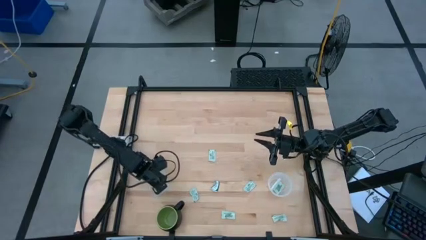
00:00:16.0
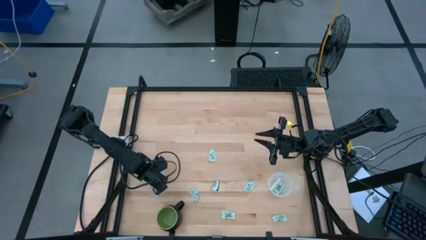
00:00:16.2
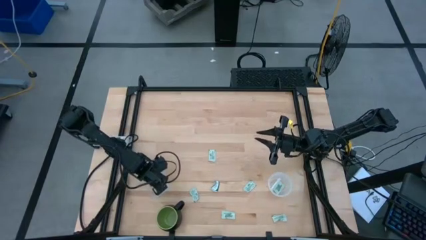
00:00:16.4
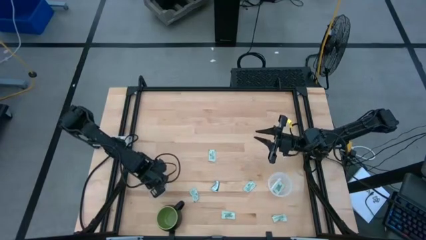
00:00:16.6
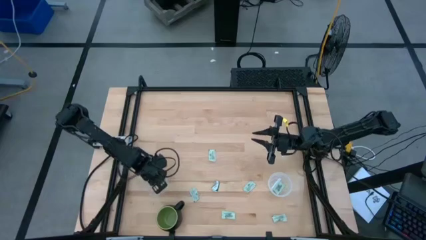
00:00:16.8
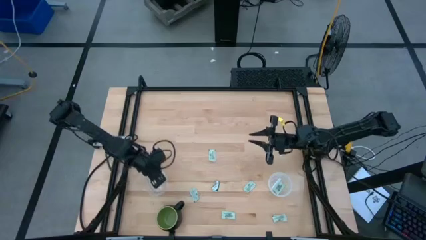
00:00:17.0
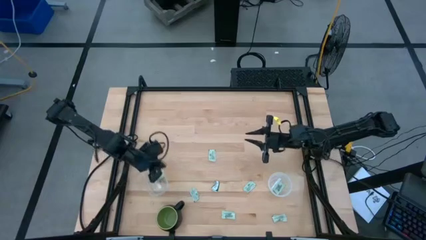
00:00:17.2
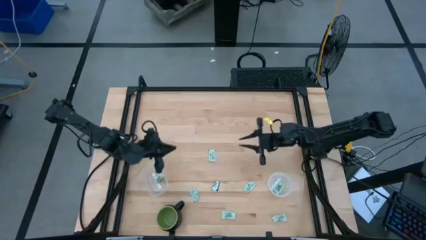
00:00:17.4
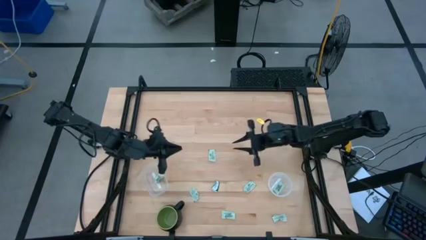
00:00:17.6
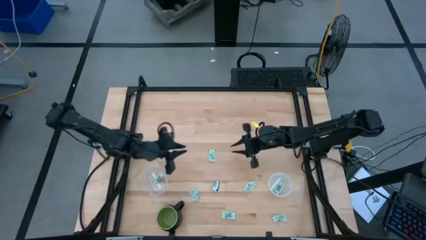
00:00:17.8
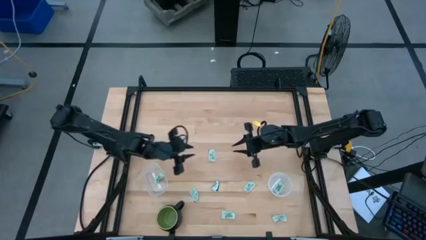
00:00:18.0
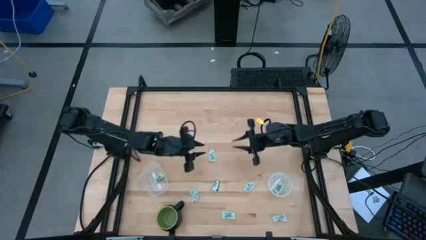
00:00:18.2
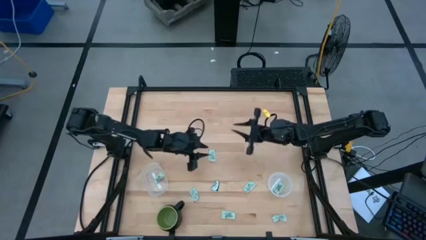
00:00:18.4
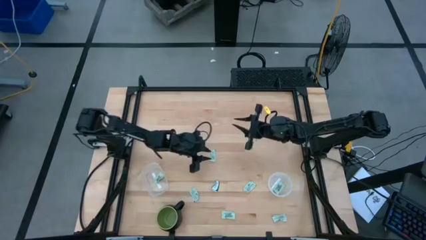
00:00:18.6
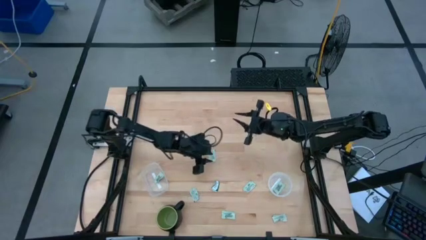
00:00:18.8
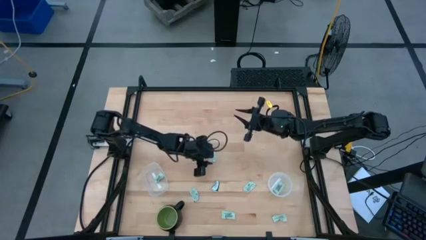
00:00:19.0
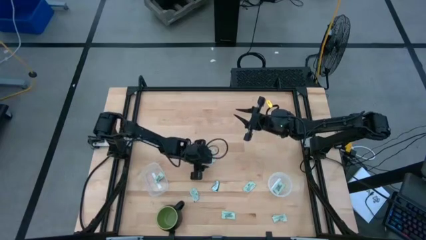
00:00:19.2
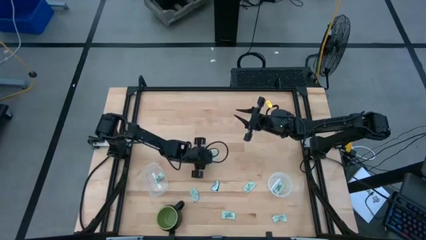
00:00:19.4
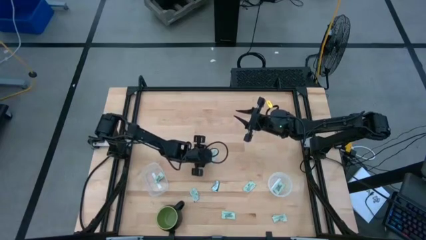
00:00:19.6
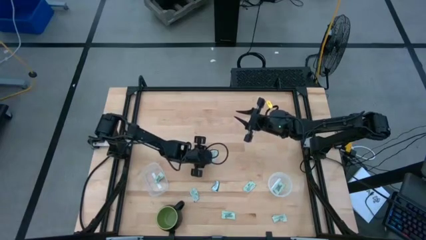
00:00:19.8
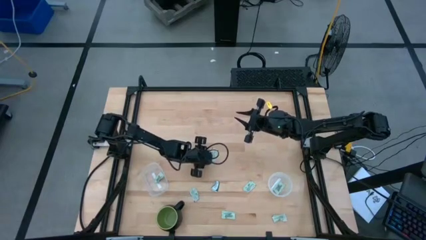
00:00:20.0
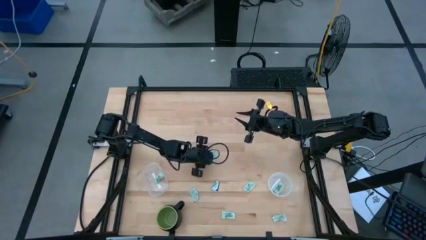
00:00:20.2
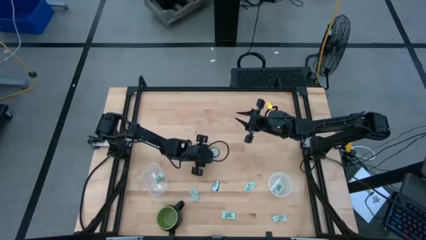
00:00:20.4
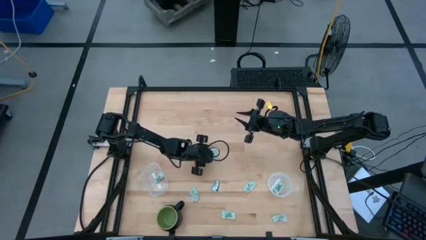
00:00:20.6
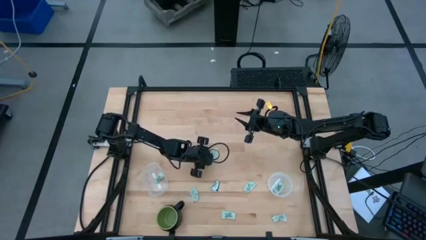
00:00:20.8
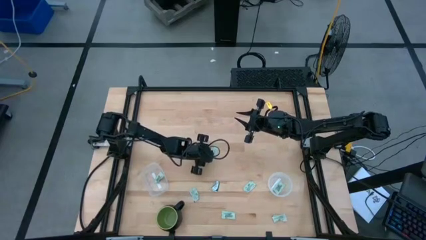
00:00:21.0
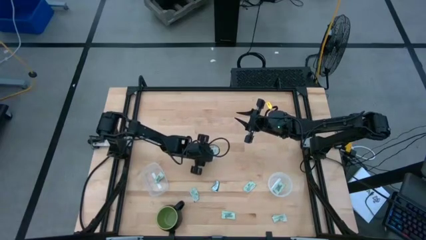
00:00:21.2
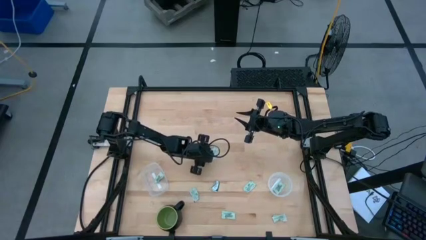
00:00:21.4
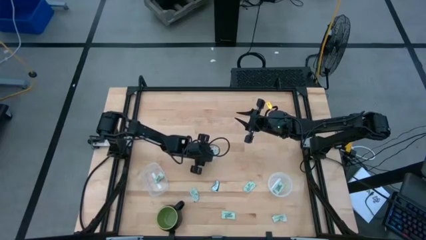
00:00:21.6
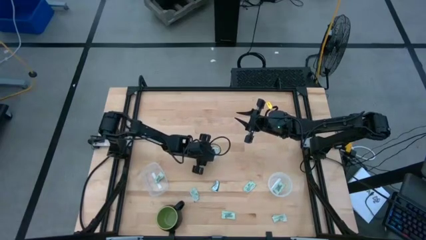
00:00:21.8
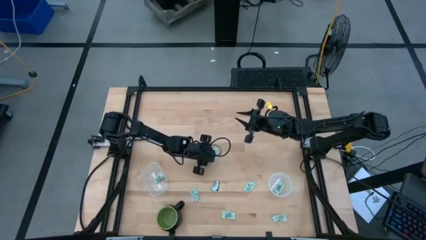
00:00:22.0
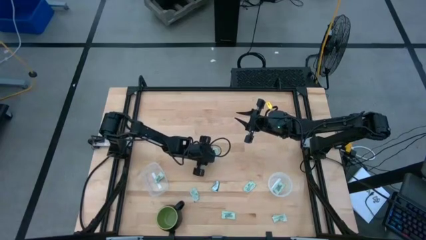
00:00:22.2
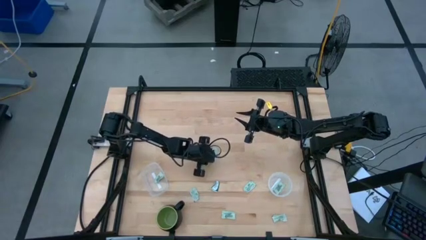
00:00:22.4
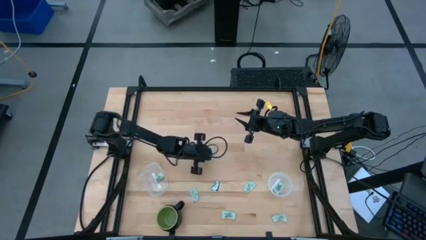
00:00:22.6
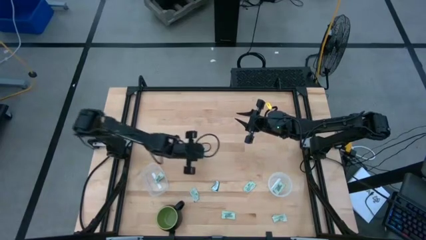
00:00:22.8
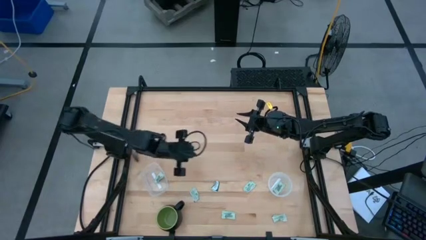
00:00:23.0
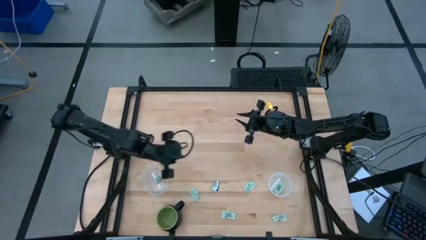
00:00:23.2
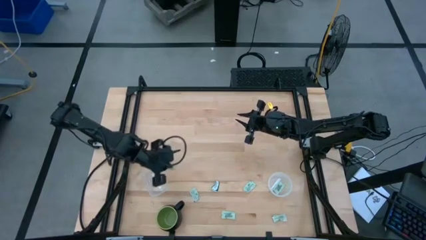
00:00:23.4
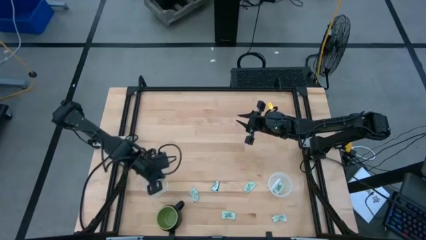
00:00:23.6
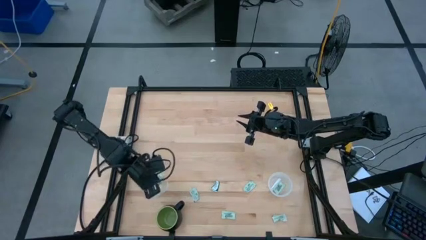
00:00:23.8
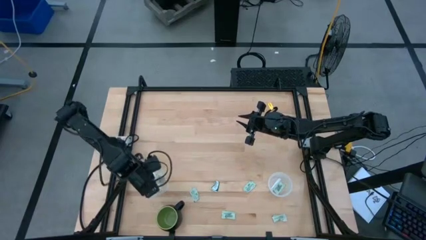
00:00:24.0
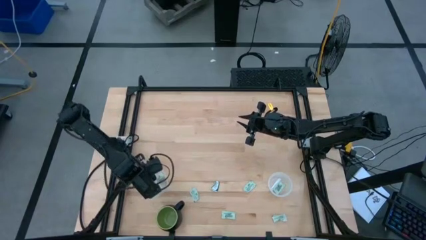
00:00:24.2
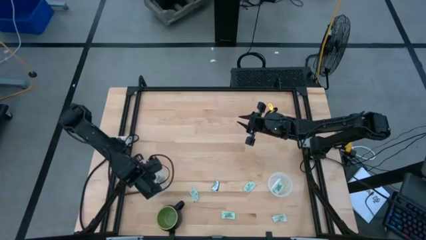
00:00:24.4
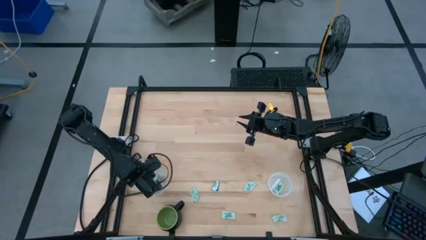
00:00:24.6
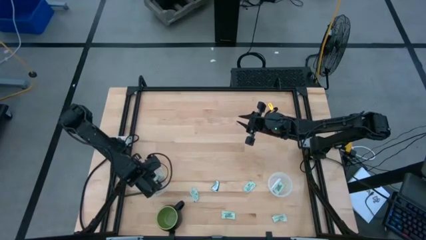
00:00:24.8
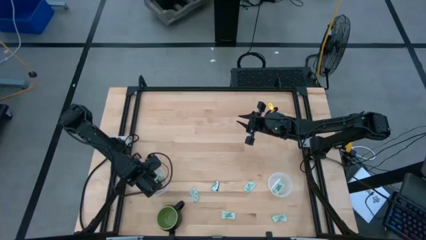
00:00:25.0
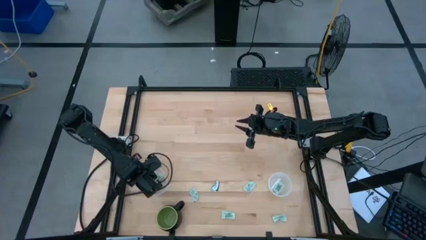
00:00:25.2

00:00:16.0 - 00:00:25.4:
Task: Pick and place items into bin
Put the green stevia packet into the left transparent bin

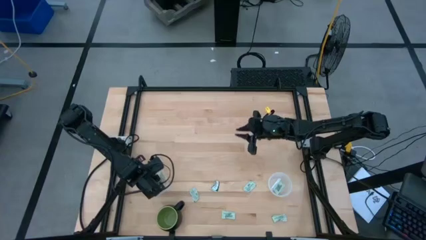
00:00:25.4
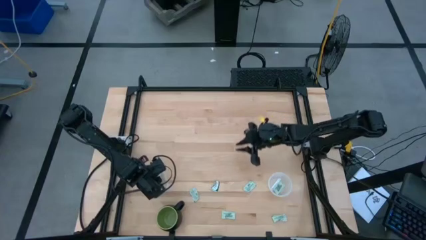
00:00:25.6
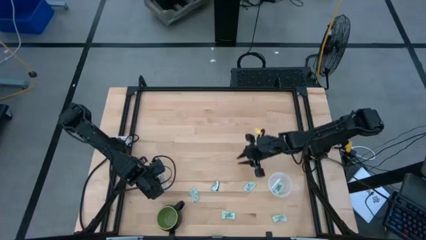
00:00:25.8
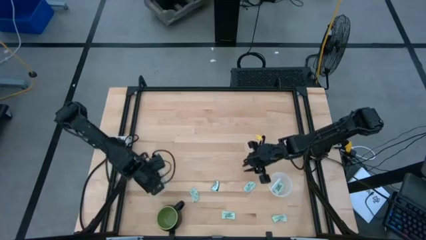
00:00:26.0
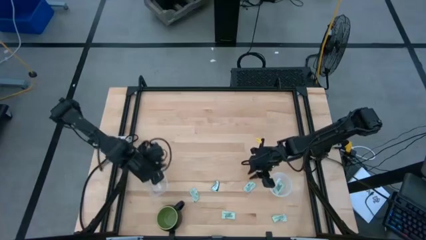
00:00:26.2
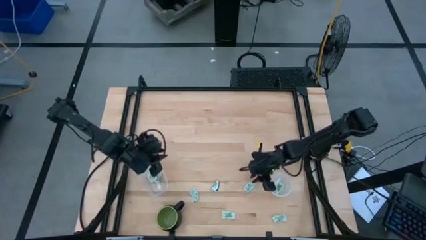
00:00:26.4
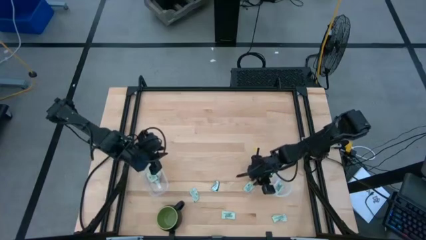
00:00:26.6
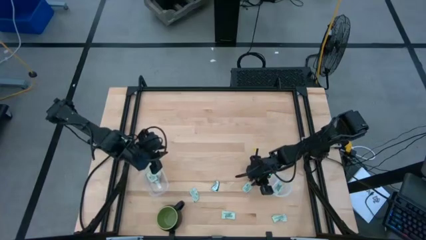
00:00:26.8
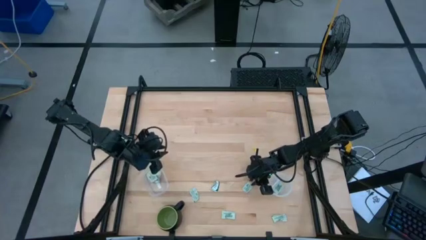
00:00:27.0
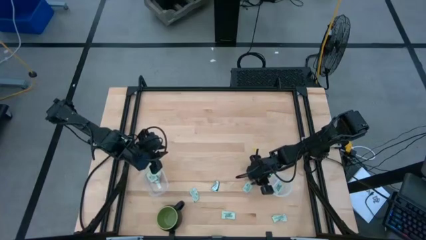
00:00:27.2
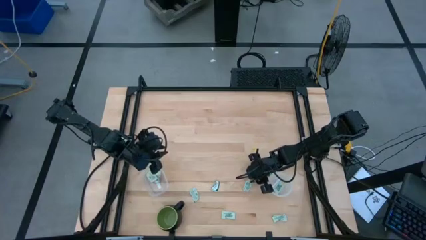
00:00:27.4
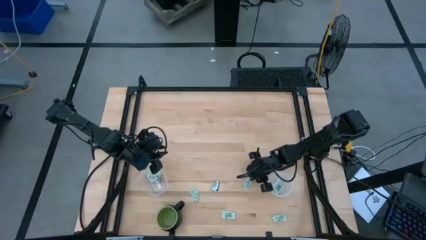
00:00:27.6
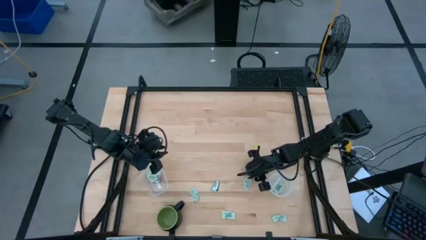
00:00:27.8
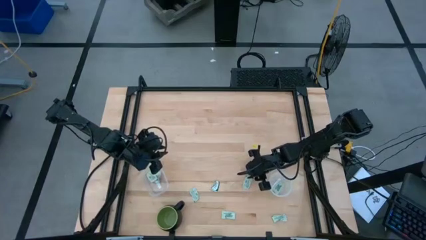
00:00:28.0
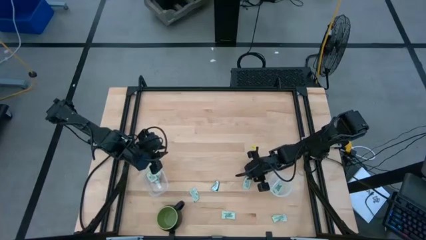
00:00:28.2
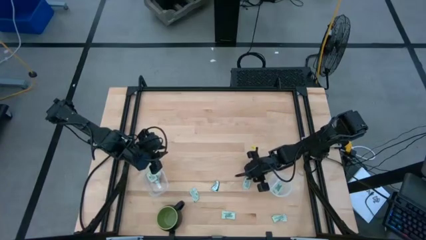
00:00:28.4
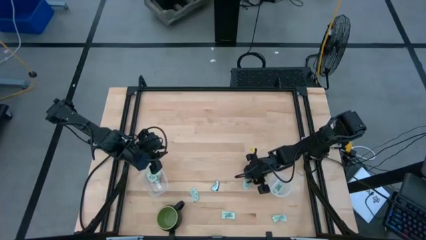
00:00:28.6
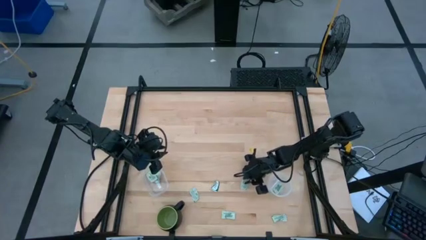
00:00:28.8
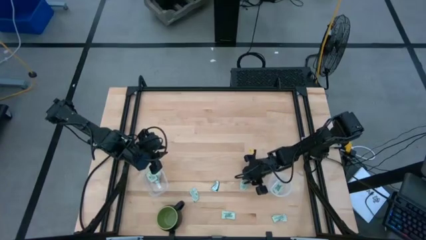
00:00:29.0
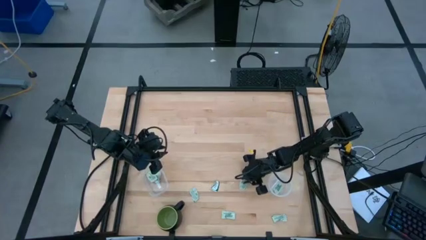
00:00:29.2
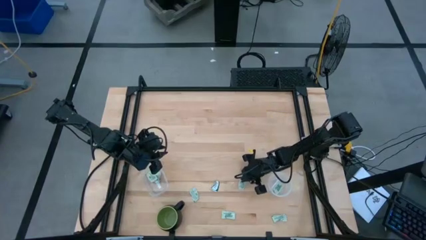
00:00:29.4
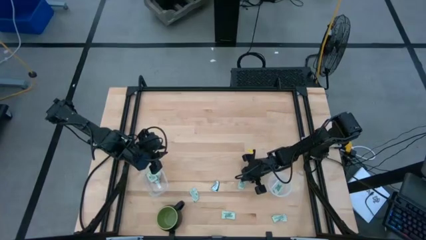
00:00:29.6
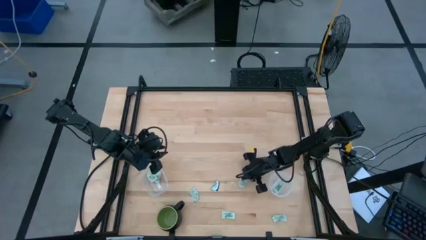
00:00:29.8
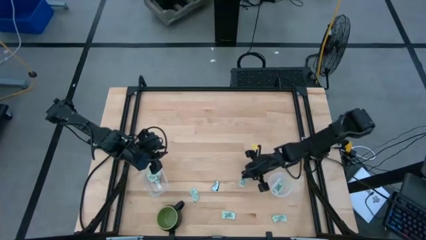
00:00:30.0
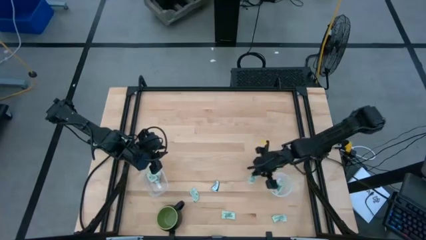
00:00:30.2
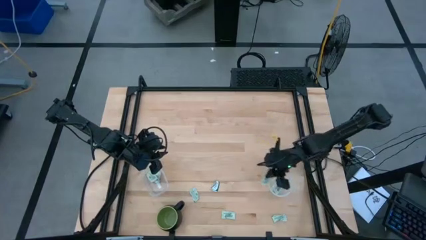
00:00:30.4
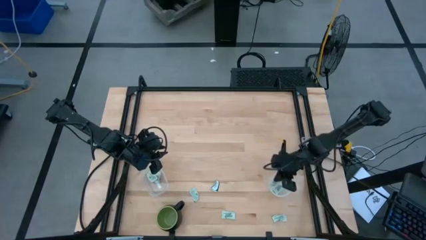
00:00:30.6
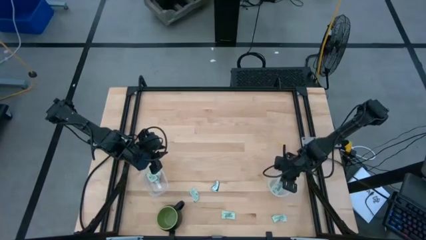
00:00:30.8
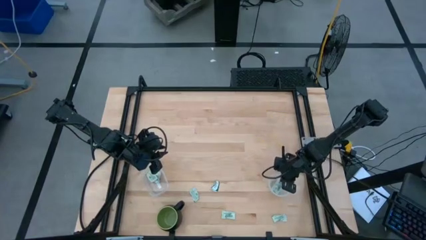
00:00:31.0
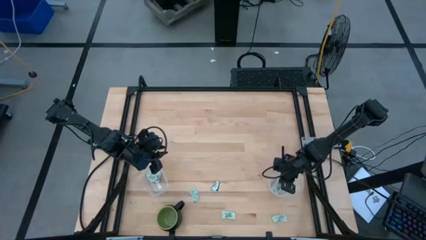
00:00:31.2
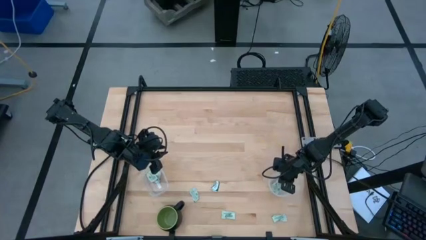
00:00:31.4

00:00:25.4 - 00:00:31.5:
Put the green stevia packet into the right transparent bin

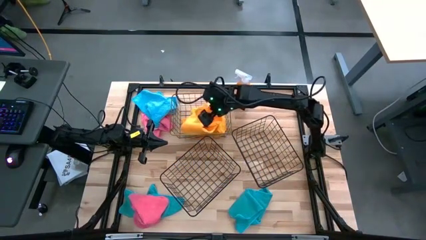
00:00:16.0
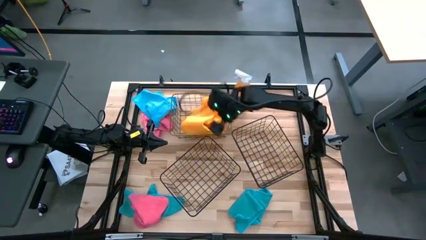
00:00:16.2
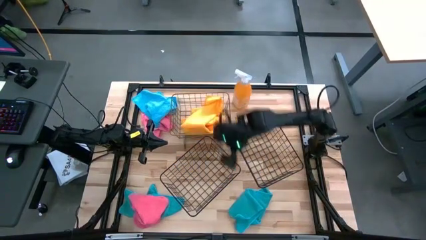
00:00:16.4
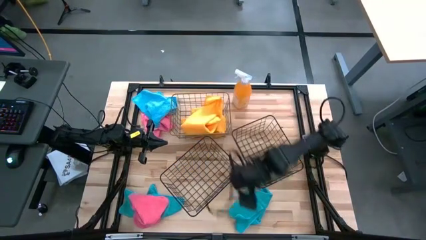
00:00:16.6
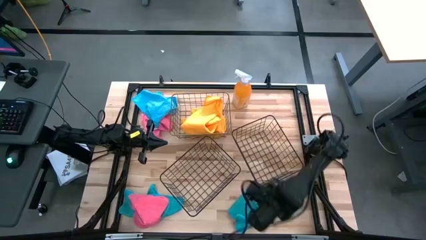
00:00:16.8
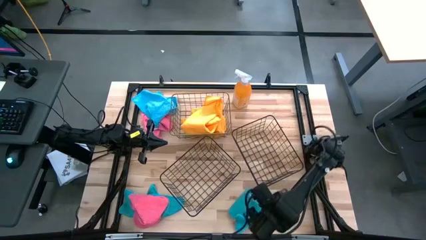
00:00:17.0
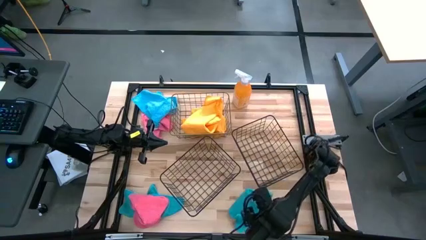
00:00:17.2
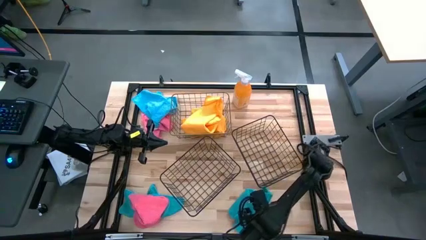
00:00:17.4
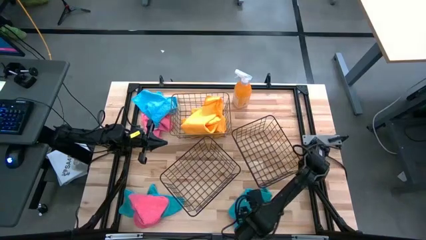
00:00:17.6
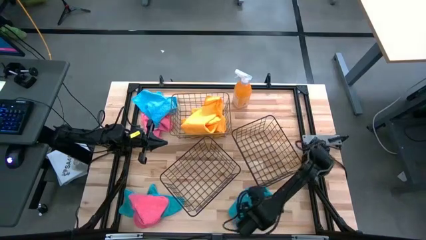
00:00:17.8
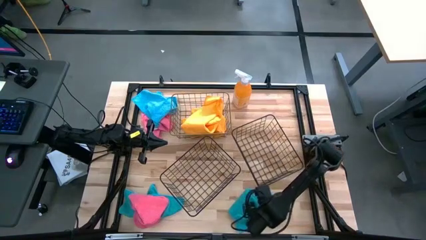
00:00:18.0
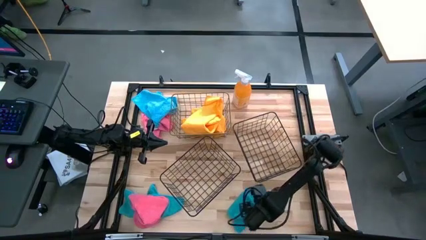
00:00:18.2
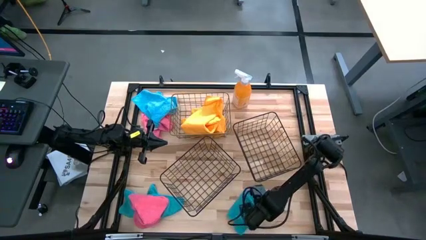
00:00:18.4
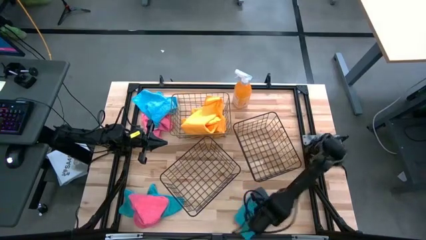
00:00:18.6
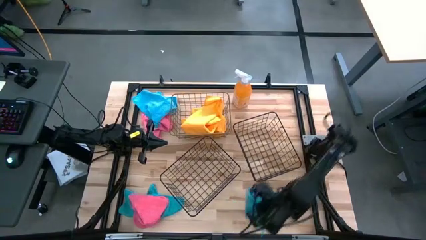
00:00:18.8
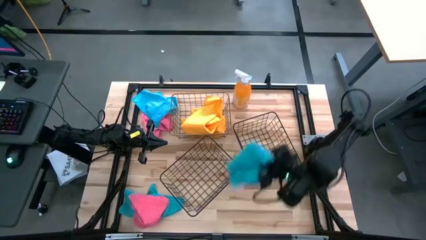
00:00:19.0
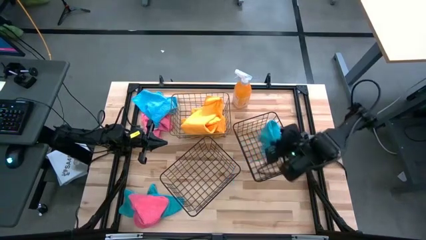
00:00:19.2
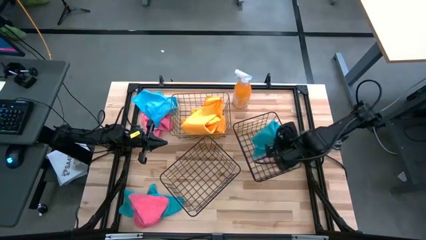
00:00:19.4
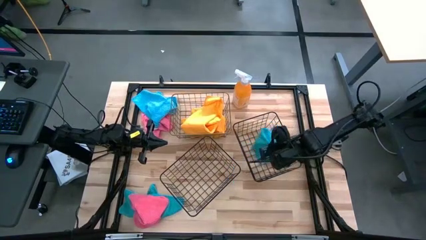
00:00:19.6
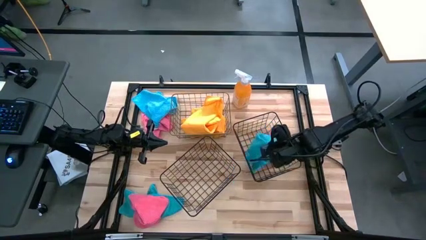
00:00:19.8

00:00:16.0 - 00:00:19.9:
Task: Sort microfiber towel by color & place in baskets
Put the bottom right blue microfiber cloth into the right black basket
